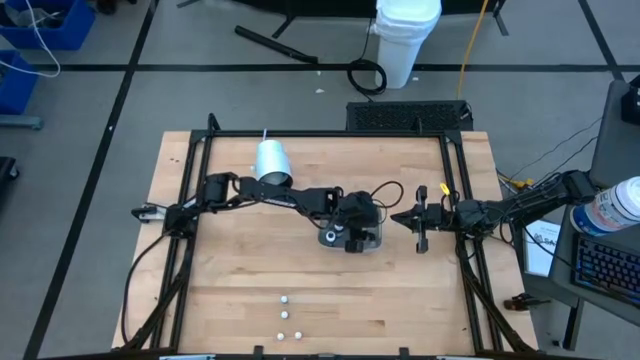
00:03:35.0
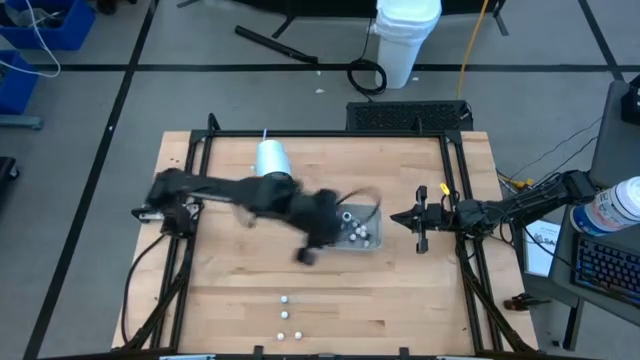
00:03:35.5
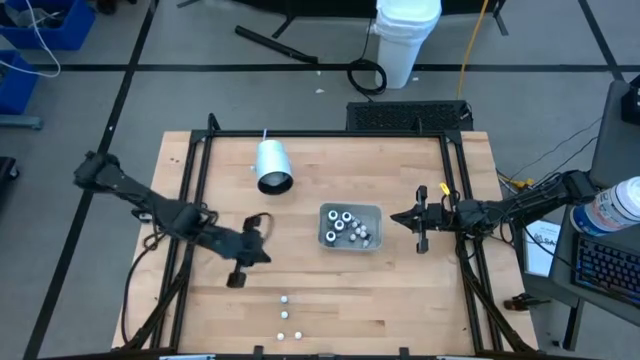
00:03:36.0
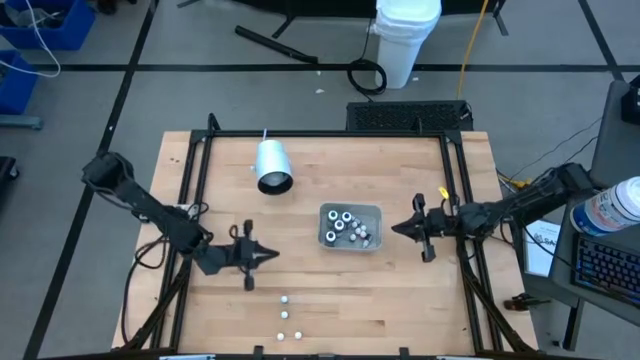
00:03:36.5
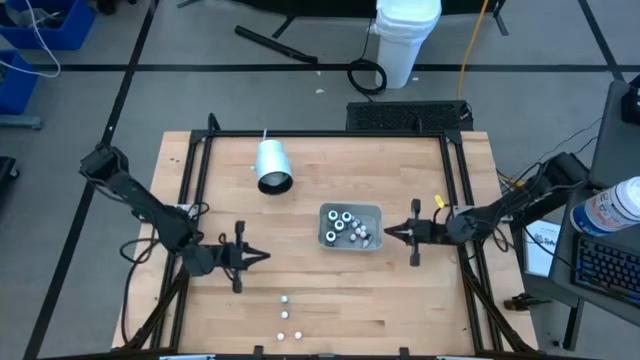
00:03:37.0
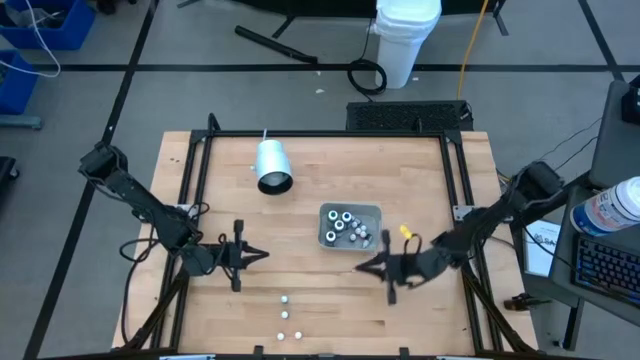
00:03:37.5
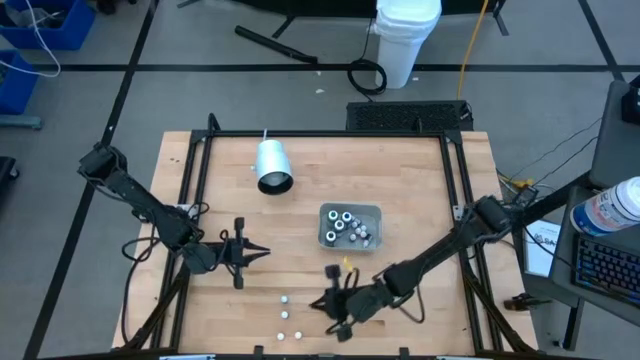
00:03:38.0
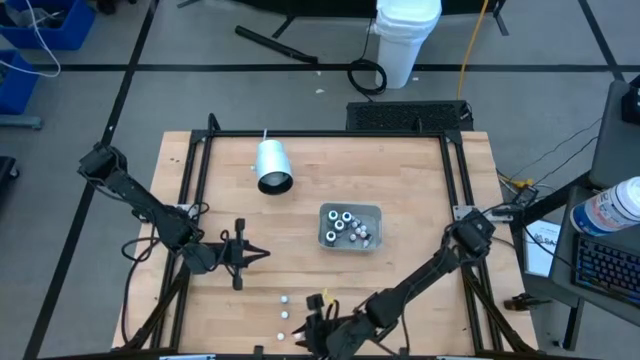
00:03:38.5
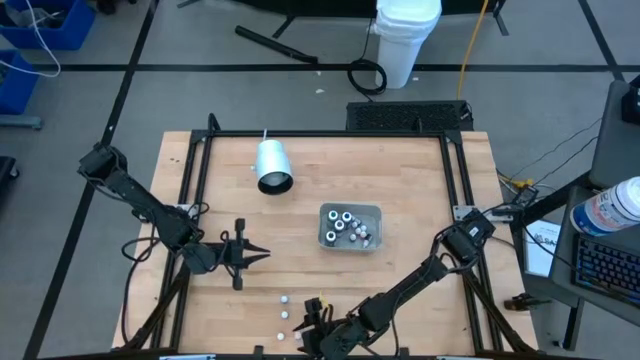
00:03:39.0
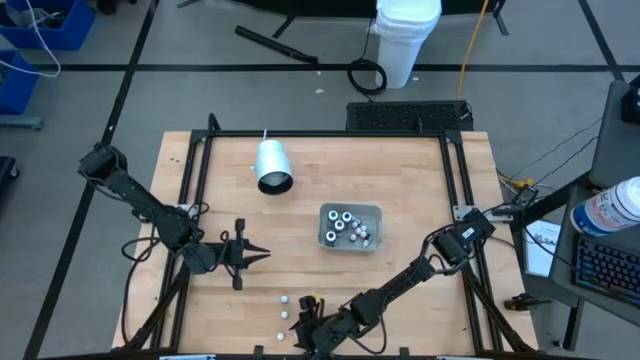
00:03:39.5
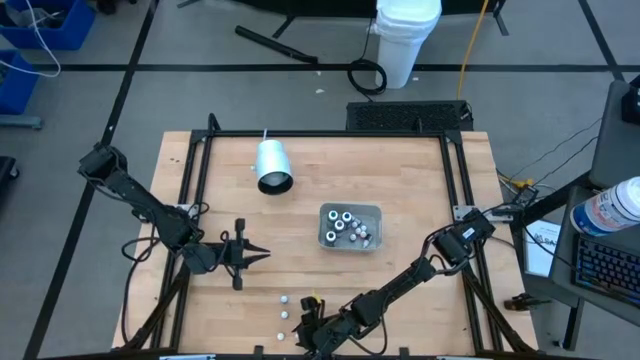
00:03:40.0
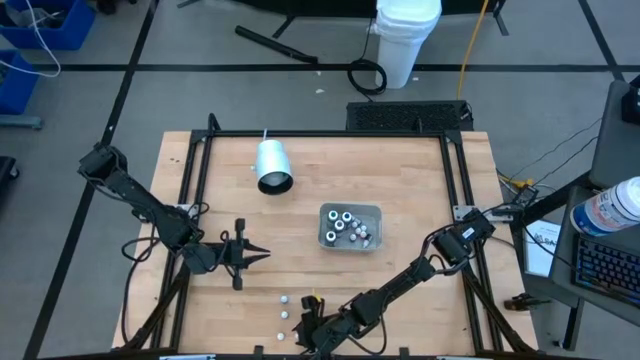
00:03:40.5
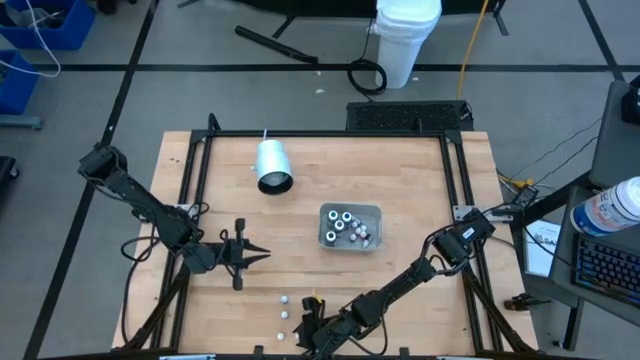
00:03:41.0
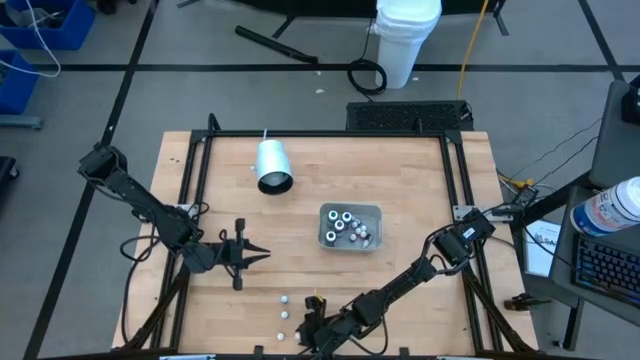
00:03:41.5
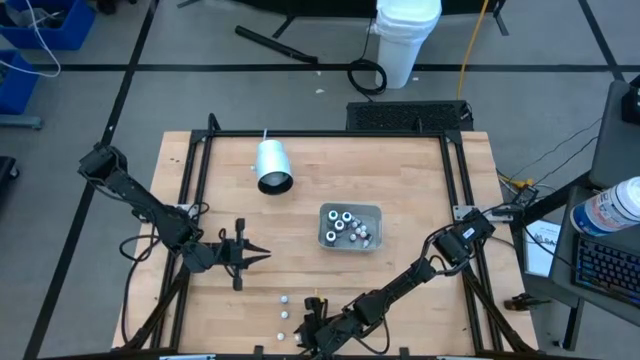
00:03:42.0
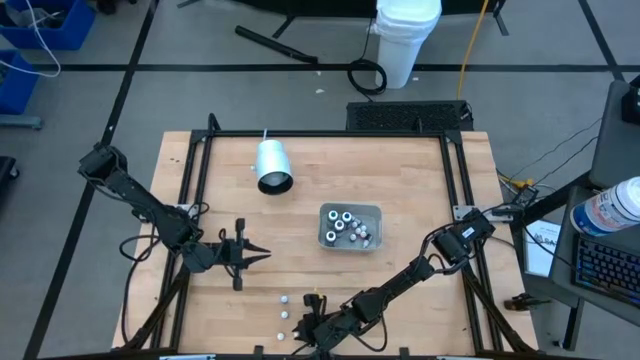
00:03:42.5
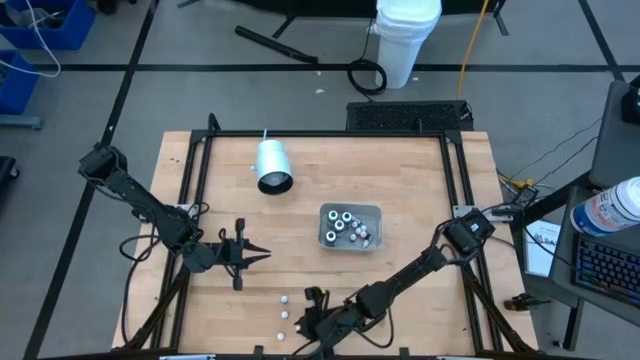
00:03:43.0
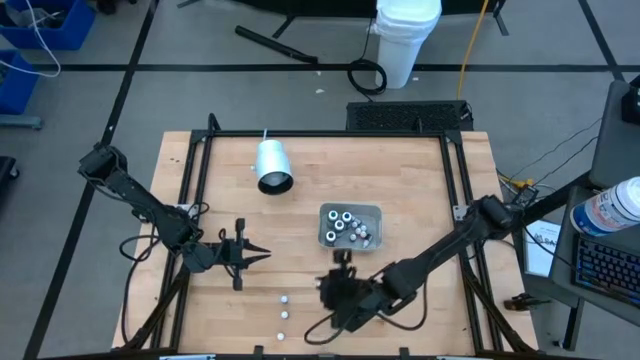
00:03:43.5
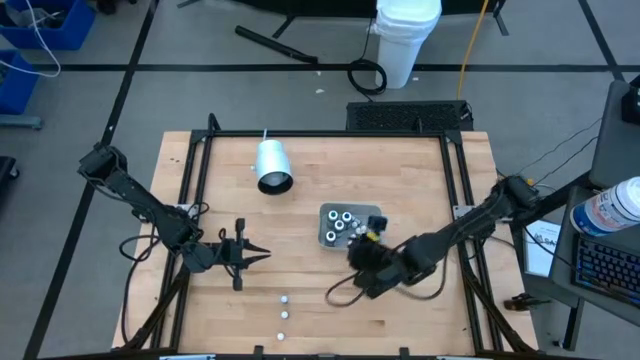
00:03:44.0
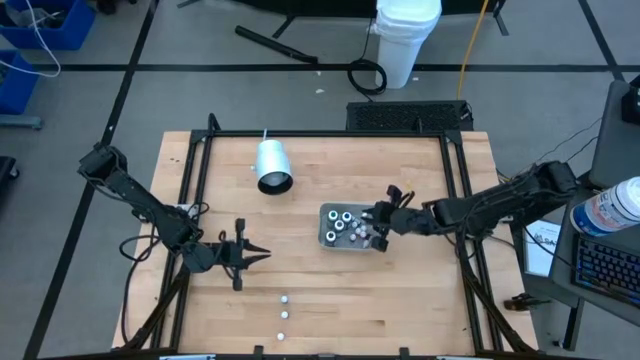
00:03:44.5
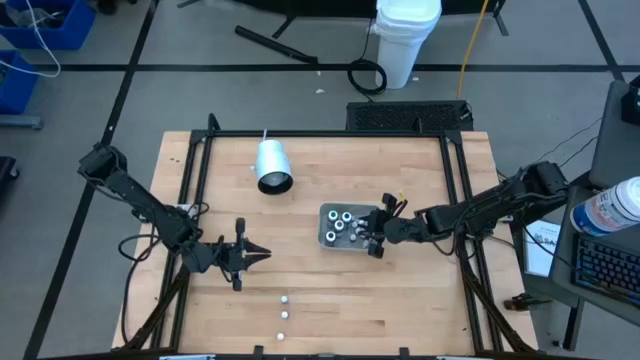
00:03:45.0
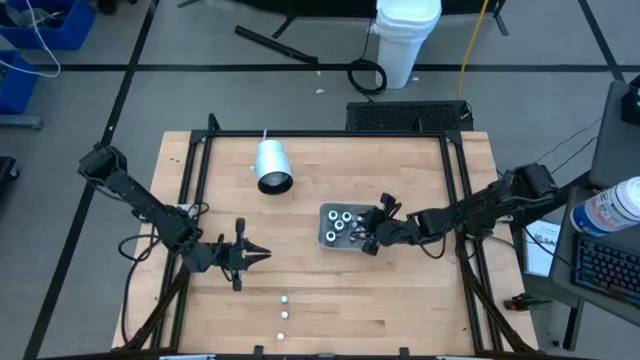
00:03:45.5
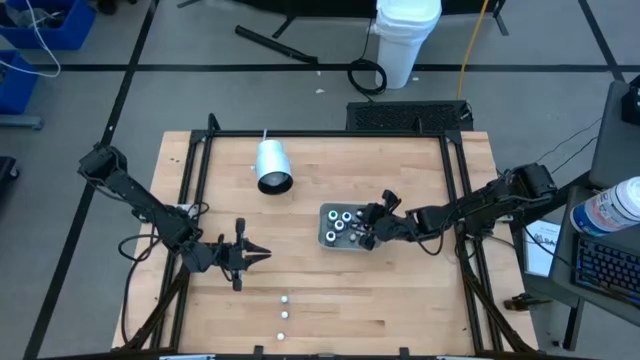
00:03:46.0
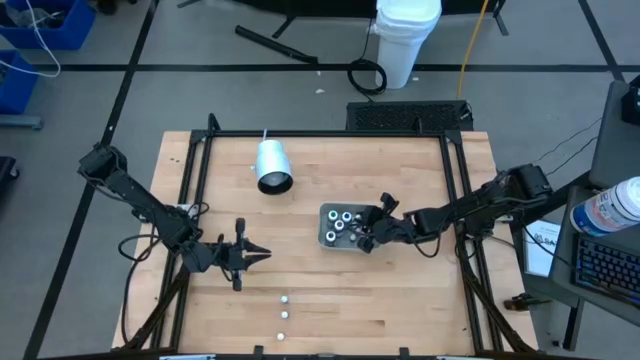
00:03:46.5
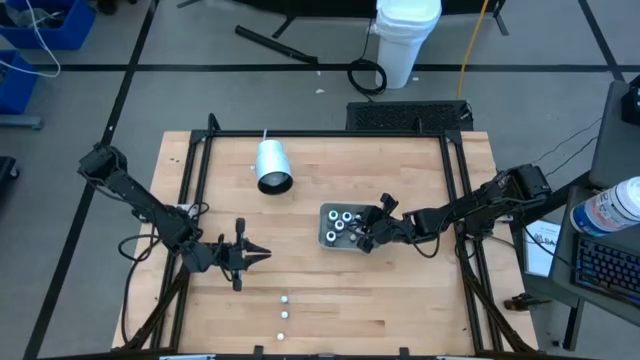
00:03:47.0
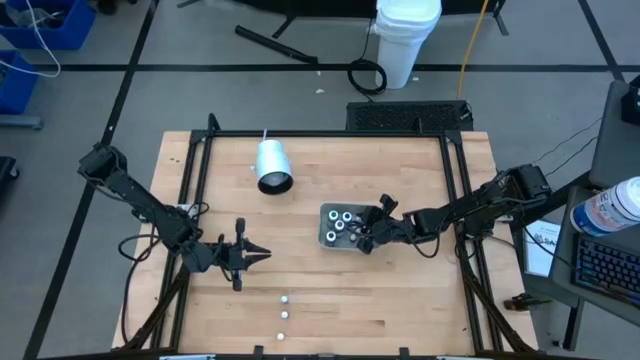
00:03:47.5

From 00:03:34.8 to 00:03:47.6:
Task: Pick & Place food coloring
Put the right small orange food coloring bottle into the white bin

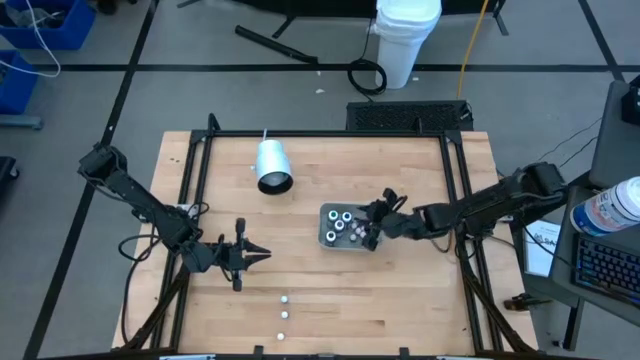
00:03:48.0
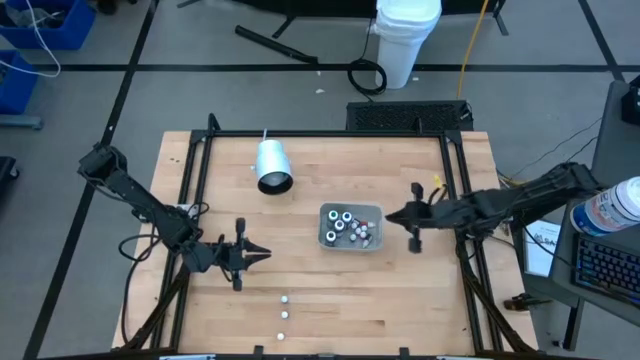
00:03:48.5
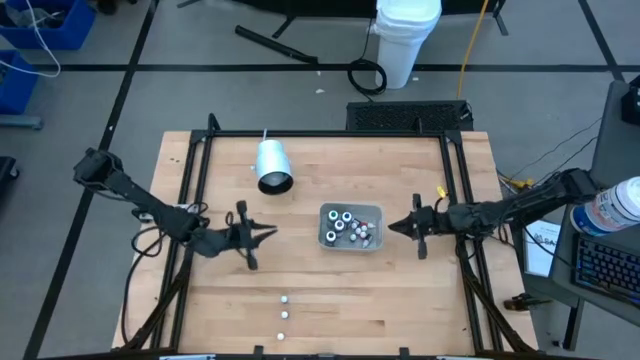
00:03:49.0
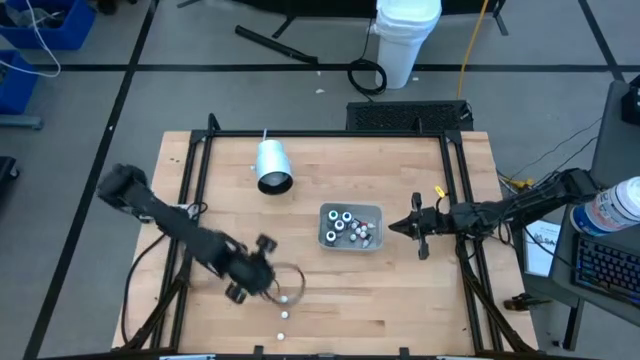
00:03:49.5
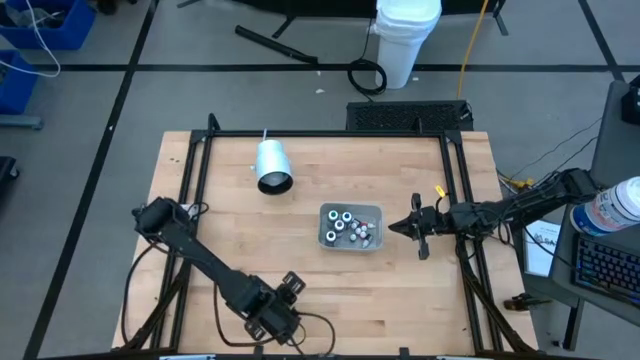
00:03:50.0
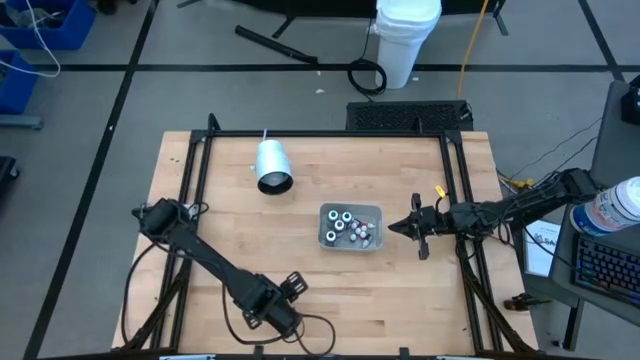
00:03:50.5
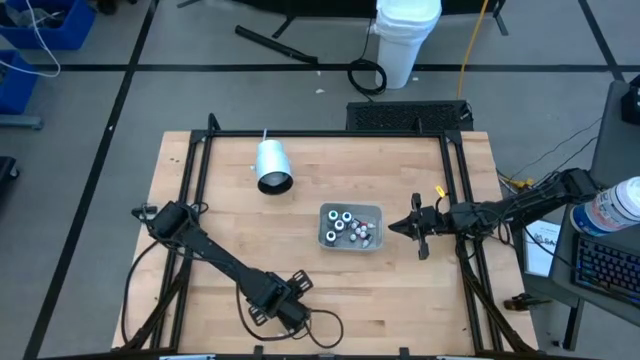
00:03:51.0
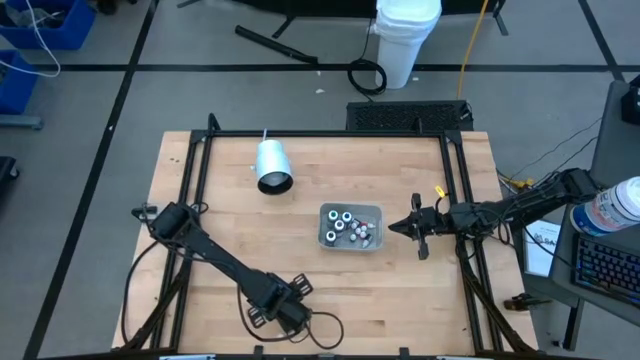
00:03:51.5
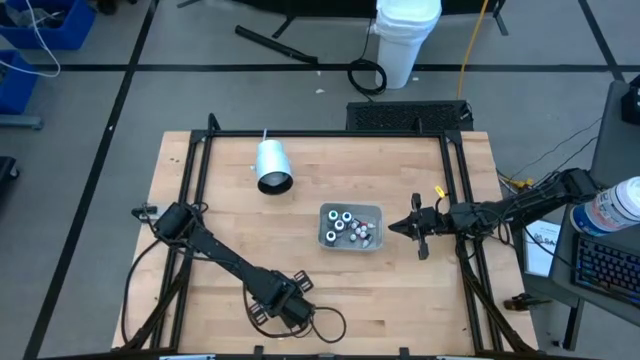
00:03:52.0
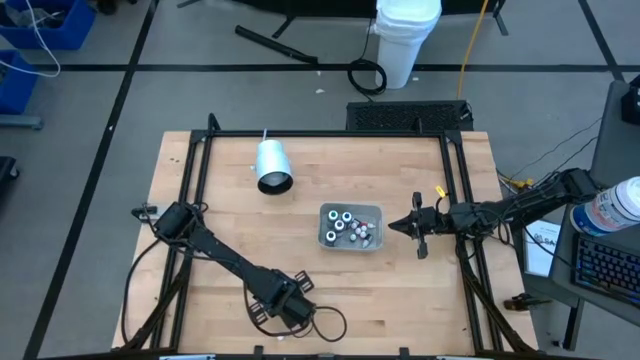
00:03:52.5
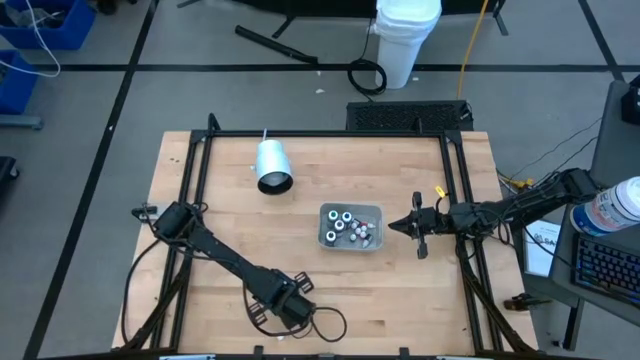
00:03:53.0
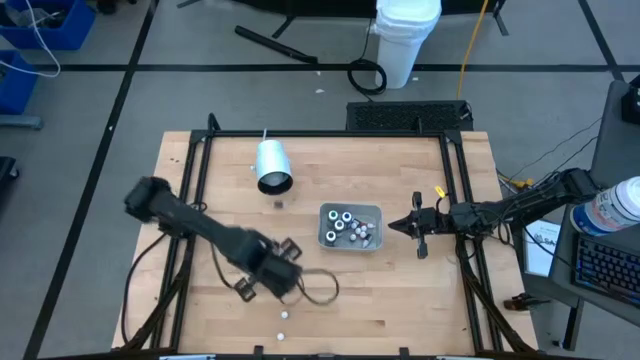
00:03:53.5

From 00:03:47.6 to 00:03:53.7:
Put the bottom small blue food coloring bottle into the white bin

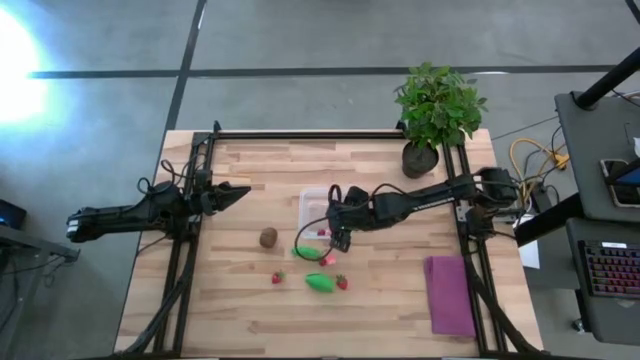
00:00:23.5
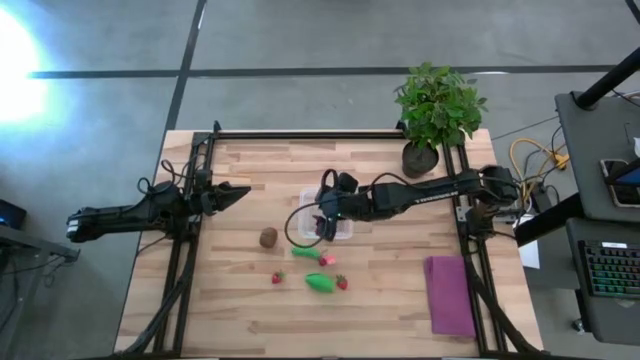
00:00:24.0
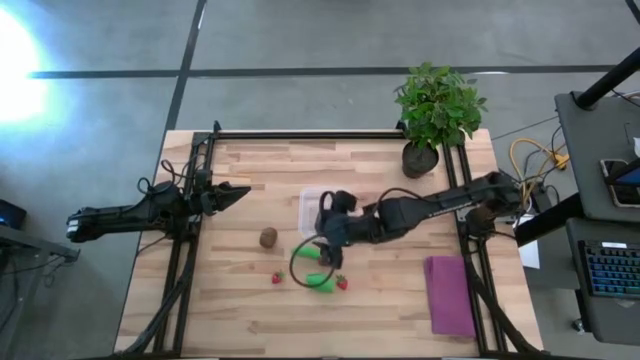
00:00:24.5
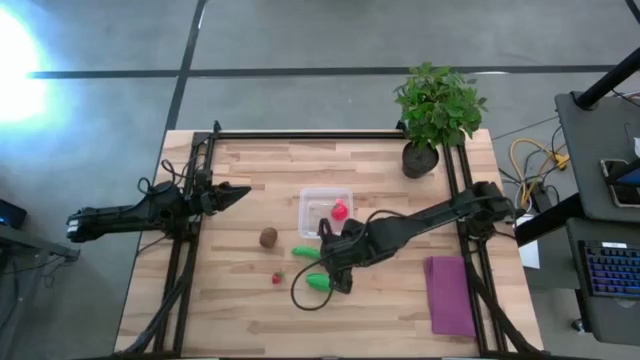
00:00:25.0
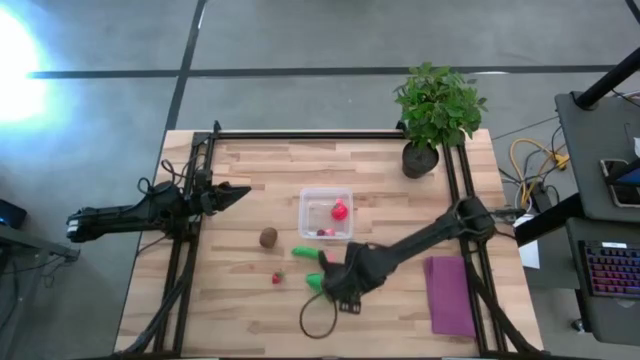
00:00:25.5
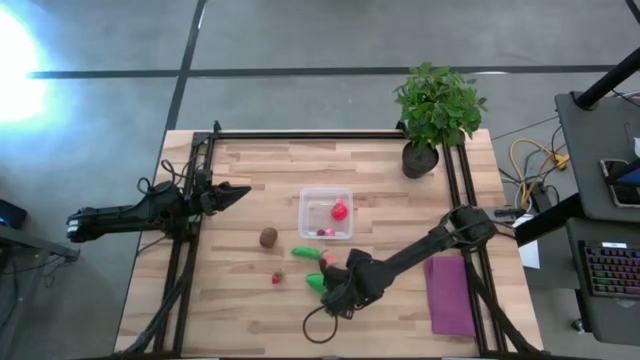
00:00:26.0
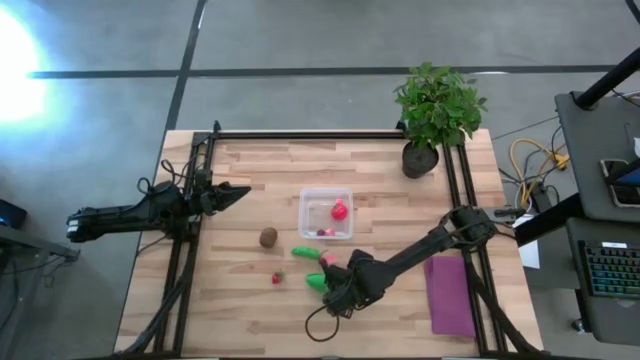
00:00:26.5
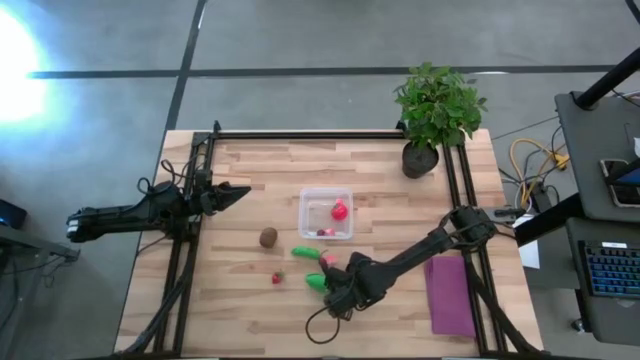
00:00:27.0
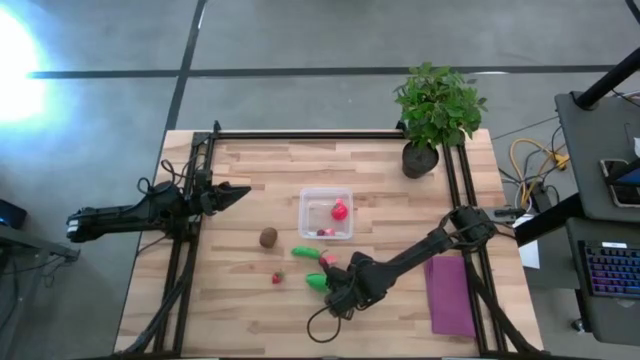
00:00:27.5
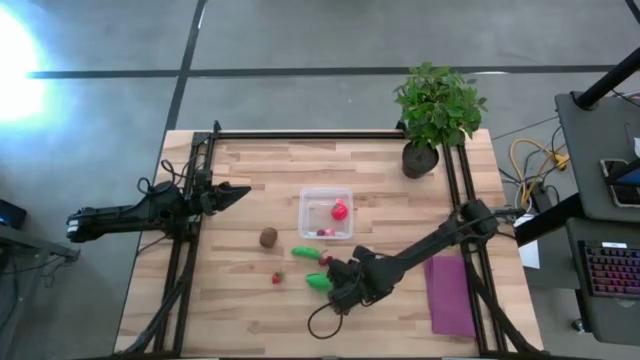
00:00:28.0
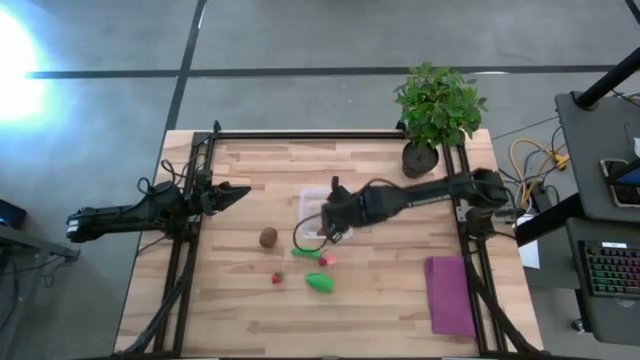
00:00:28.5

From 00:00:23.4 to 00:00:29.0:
Task: Pick and placing Produce into tupperware
Put the right red strawberry into the transparent bin
